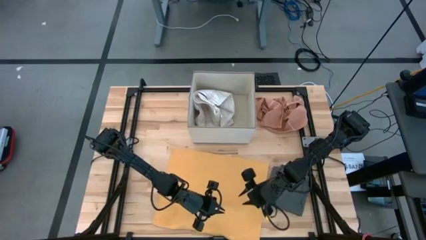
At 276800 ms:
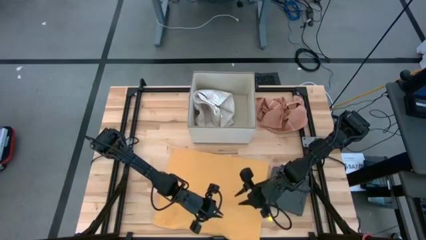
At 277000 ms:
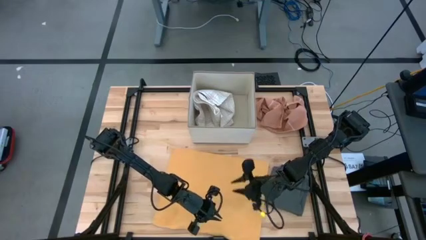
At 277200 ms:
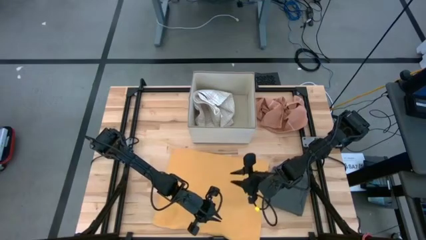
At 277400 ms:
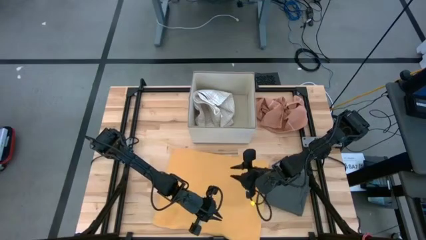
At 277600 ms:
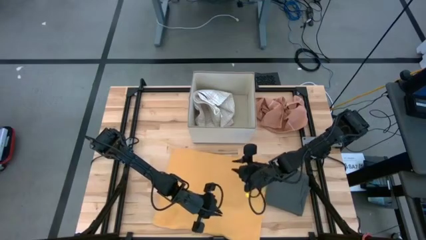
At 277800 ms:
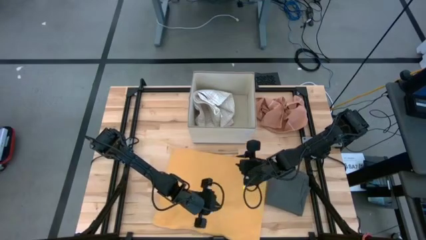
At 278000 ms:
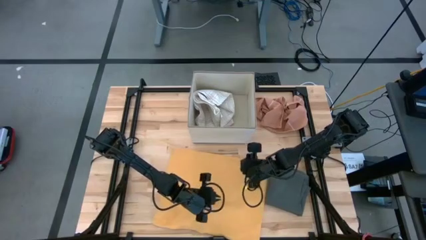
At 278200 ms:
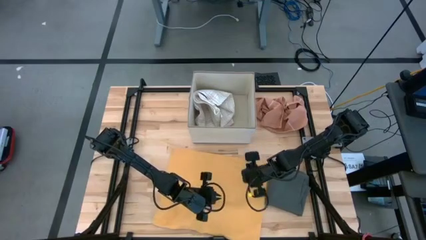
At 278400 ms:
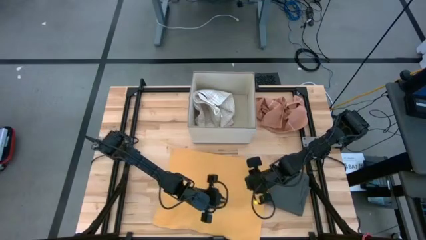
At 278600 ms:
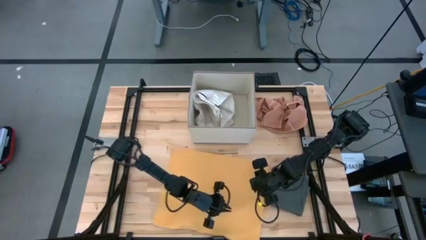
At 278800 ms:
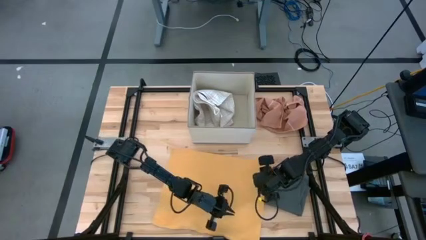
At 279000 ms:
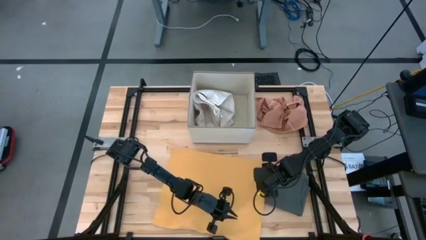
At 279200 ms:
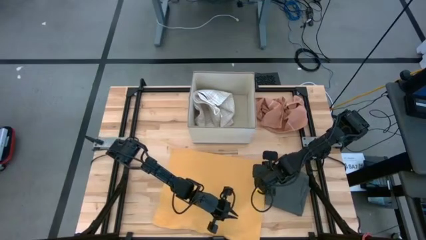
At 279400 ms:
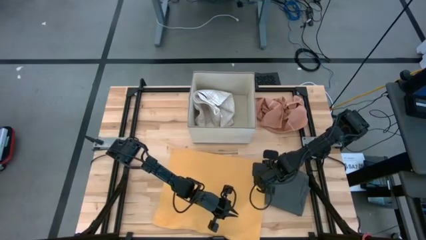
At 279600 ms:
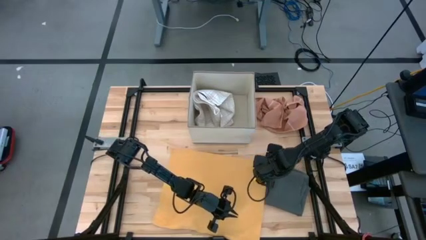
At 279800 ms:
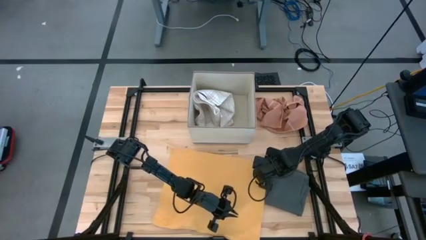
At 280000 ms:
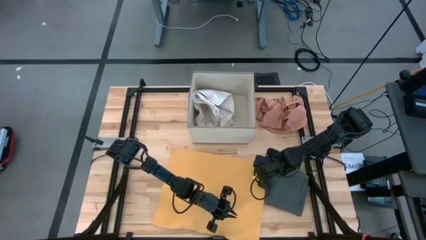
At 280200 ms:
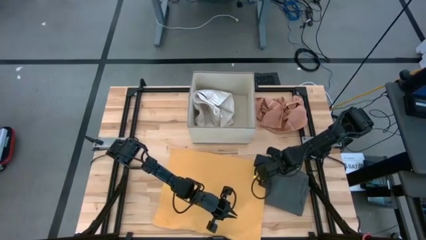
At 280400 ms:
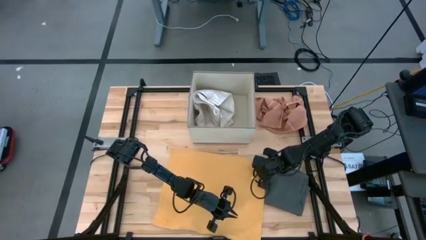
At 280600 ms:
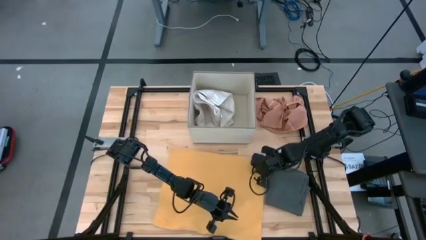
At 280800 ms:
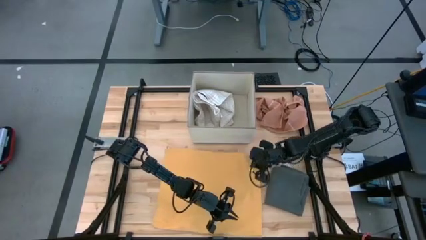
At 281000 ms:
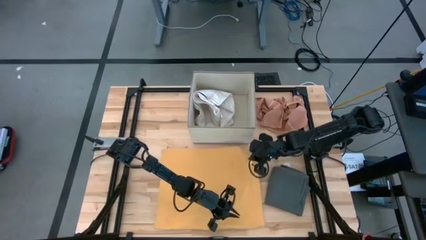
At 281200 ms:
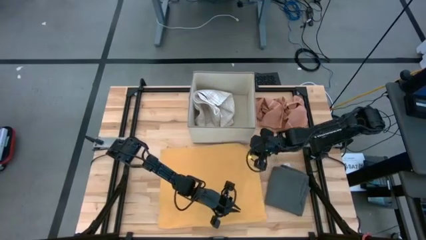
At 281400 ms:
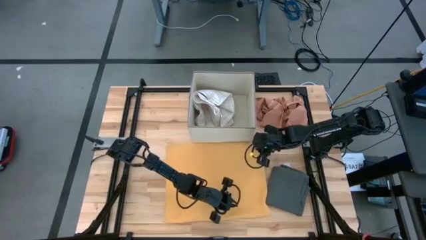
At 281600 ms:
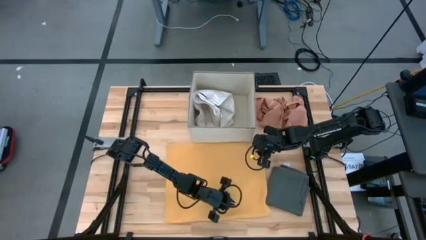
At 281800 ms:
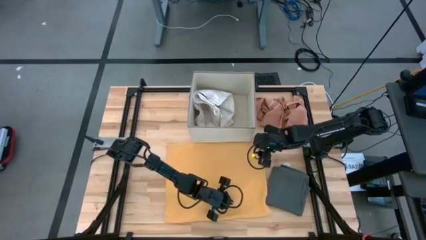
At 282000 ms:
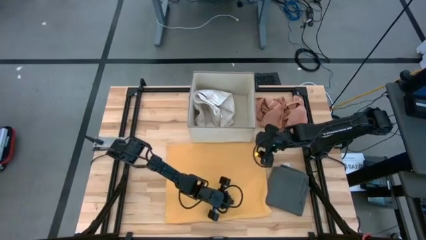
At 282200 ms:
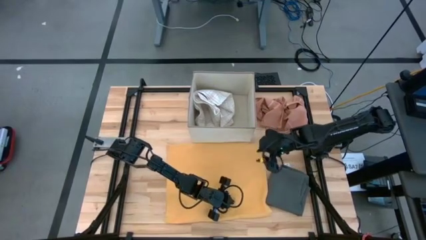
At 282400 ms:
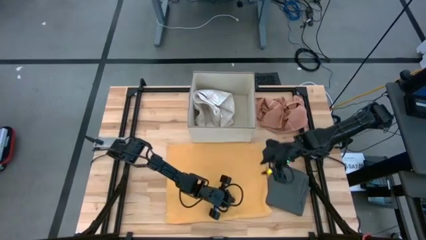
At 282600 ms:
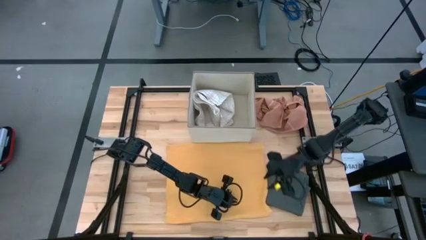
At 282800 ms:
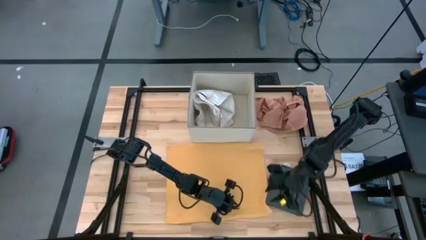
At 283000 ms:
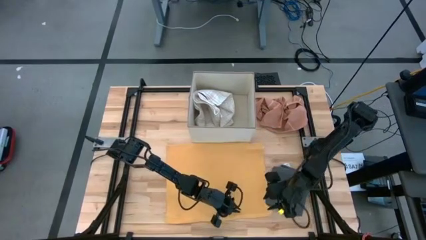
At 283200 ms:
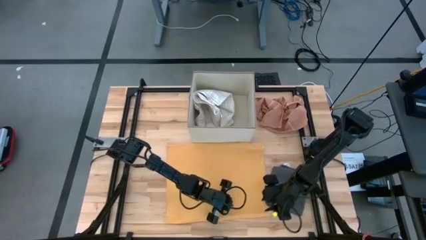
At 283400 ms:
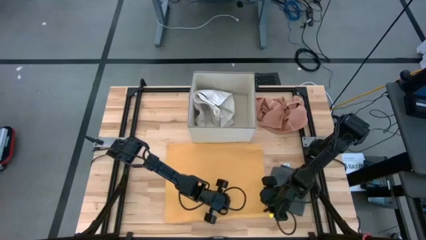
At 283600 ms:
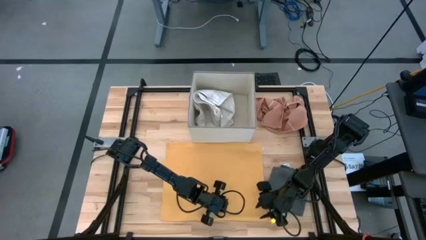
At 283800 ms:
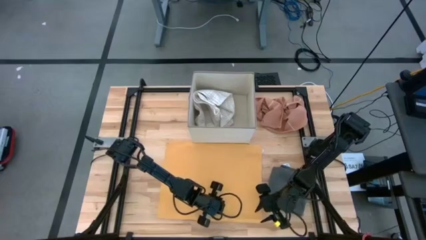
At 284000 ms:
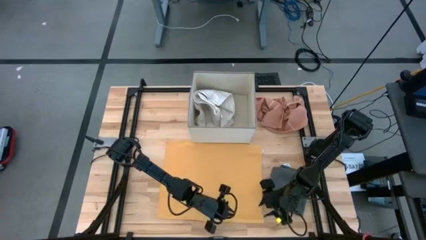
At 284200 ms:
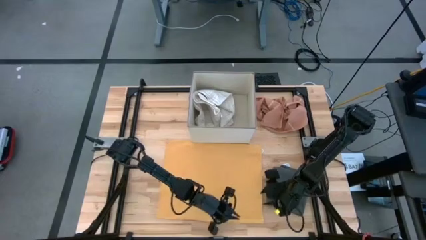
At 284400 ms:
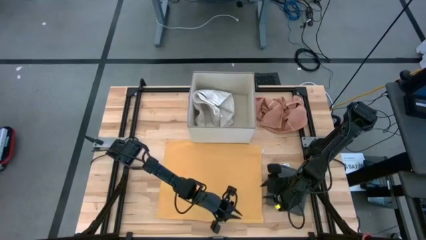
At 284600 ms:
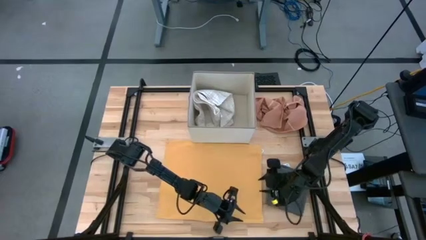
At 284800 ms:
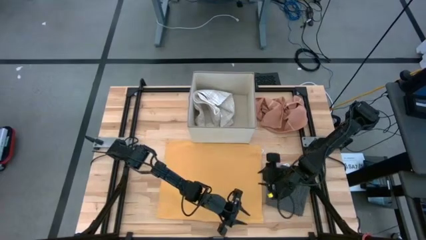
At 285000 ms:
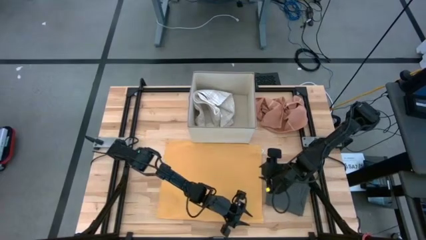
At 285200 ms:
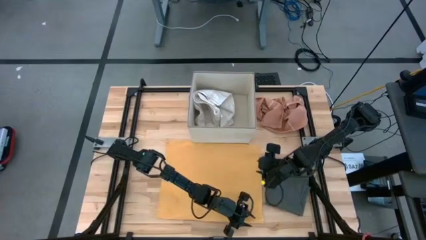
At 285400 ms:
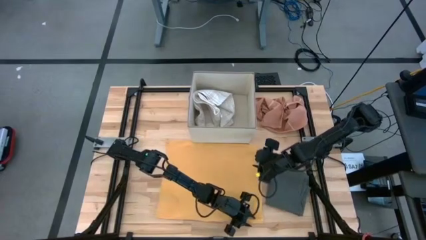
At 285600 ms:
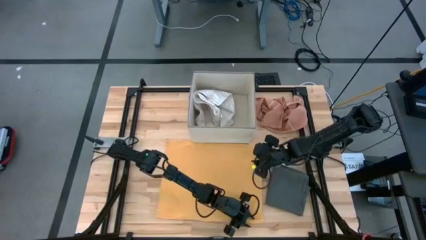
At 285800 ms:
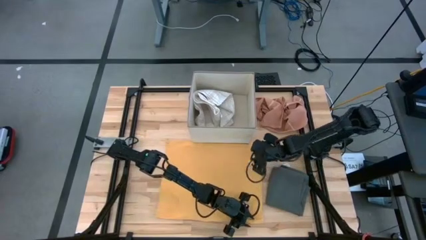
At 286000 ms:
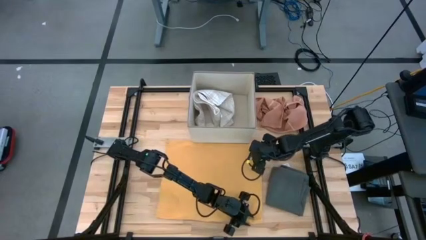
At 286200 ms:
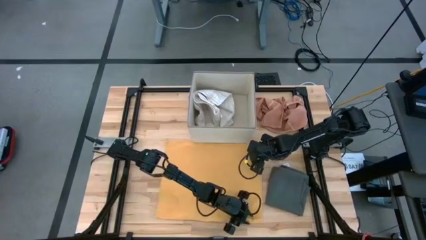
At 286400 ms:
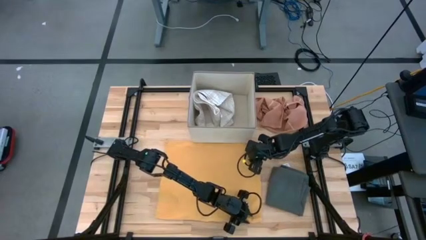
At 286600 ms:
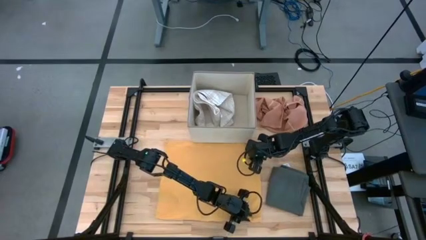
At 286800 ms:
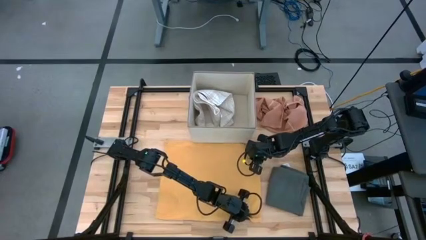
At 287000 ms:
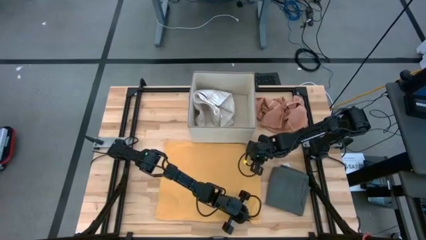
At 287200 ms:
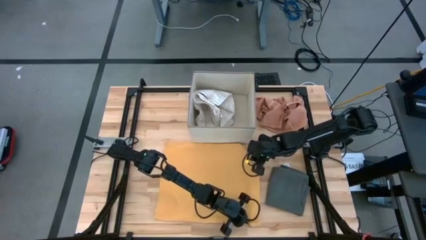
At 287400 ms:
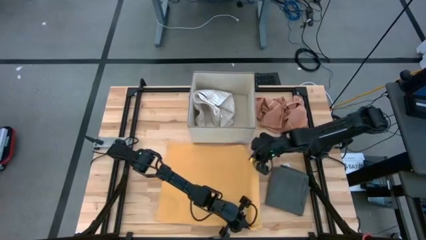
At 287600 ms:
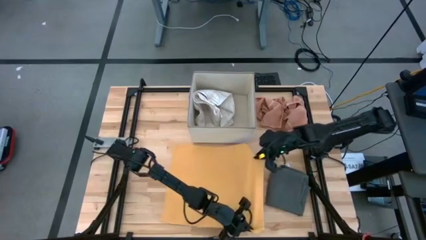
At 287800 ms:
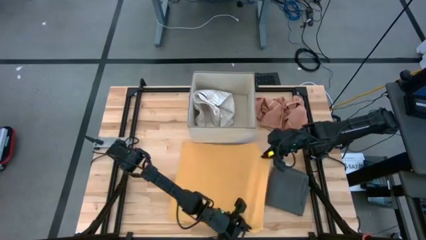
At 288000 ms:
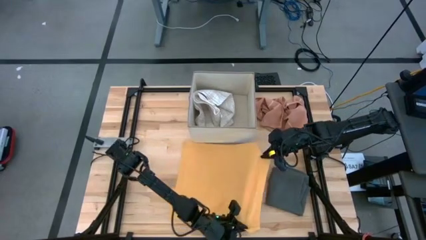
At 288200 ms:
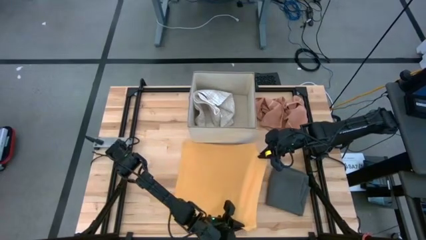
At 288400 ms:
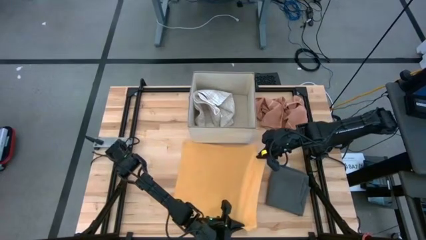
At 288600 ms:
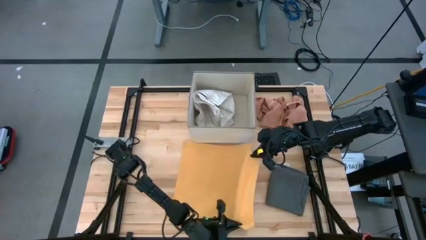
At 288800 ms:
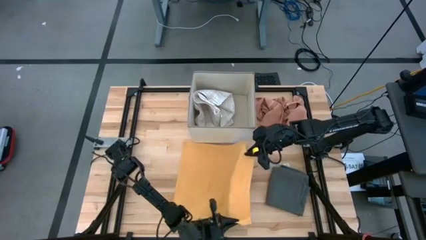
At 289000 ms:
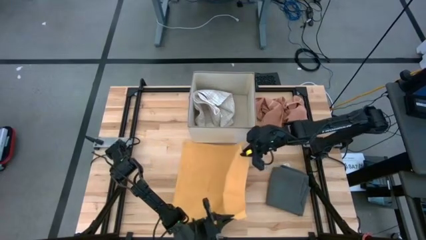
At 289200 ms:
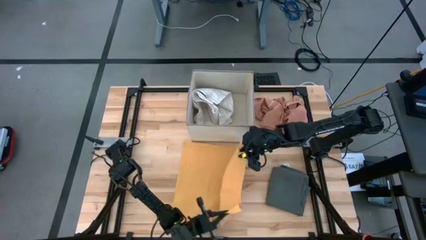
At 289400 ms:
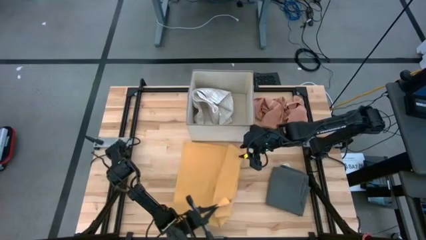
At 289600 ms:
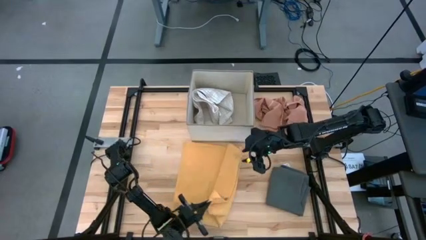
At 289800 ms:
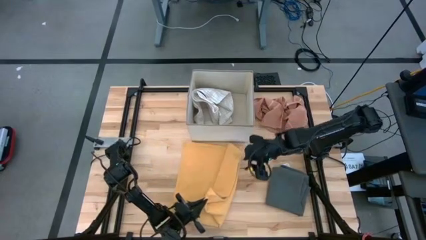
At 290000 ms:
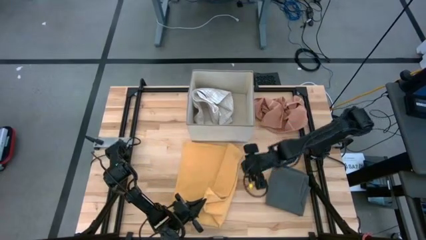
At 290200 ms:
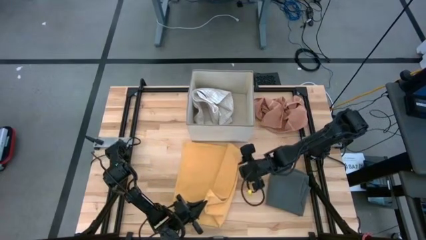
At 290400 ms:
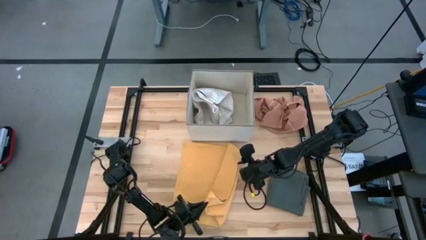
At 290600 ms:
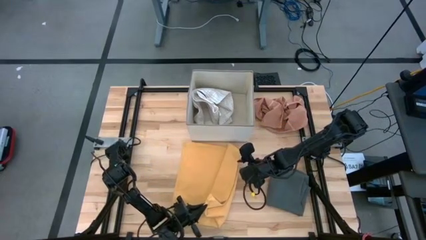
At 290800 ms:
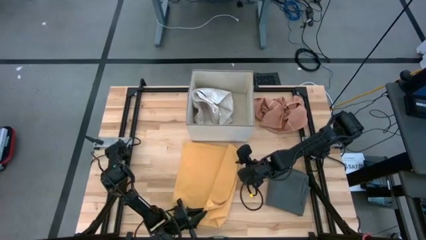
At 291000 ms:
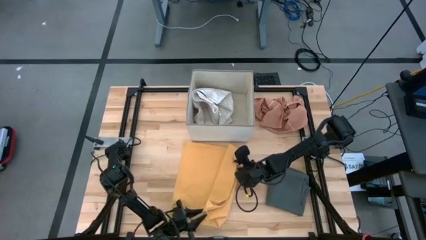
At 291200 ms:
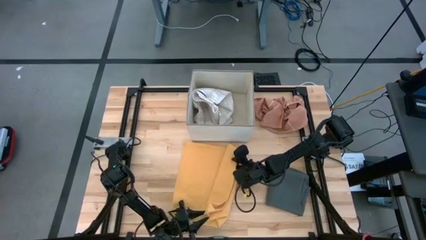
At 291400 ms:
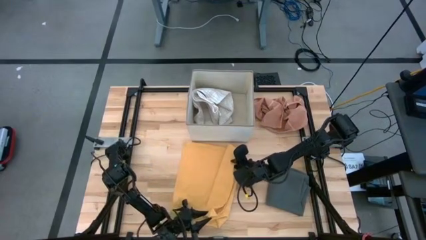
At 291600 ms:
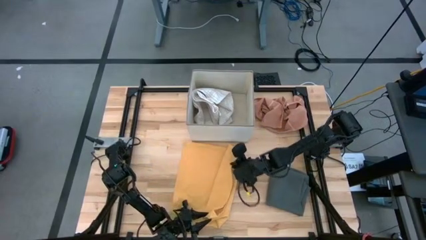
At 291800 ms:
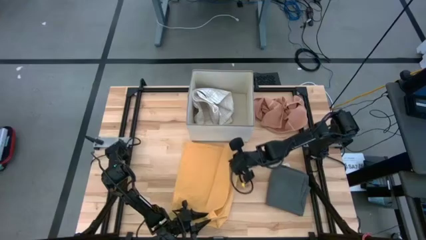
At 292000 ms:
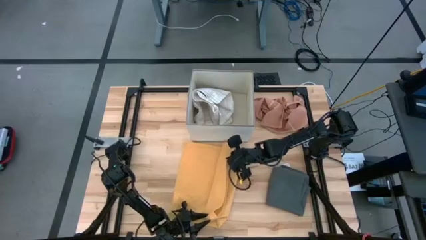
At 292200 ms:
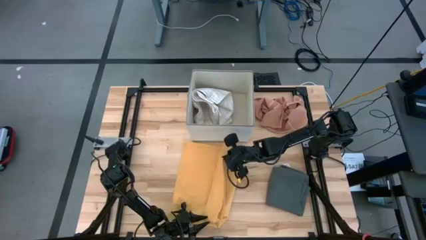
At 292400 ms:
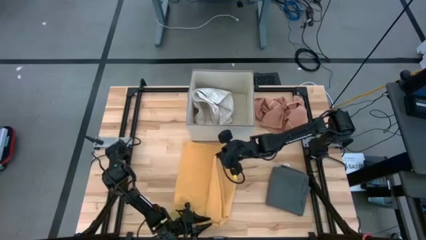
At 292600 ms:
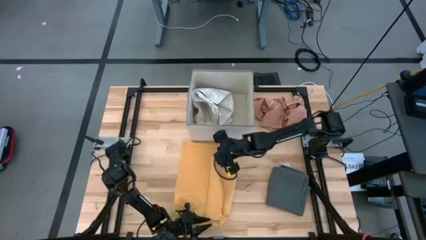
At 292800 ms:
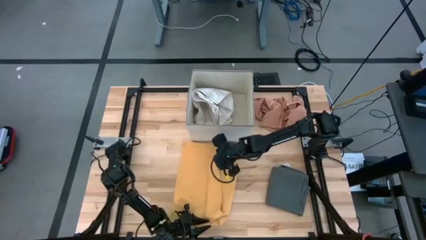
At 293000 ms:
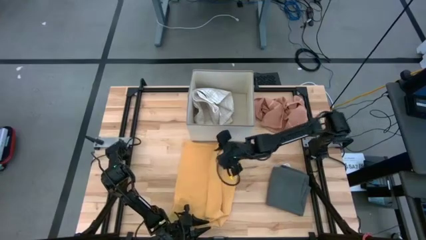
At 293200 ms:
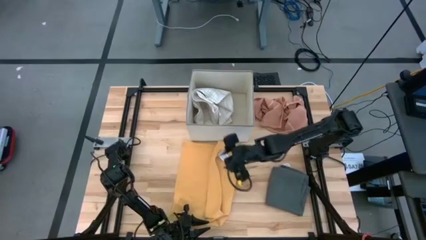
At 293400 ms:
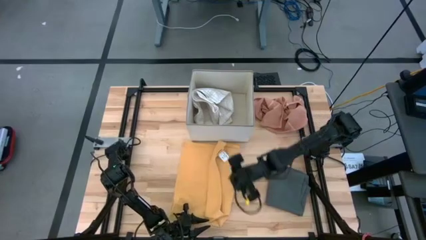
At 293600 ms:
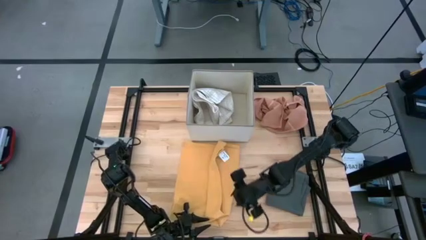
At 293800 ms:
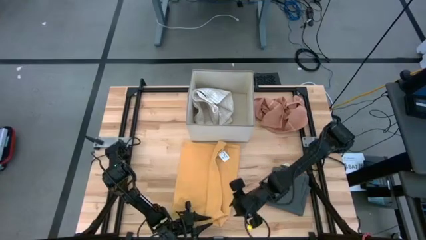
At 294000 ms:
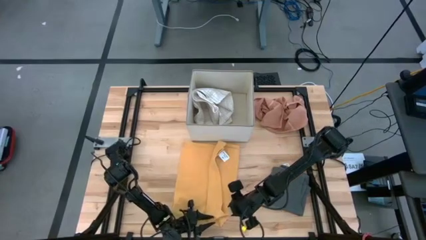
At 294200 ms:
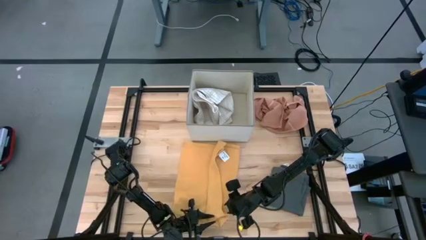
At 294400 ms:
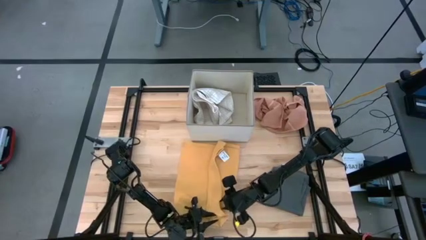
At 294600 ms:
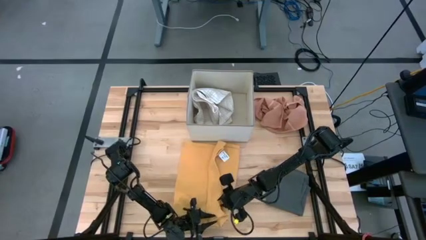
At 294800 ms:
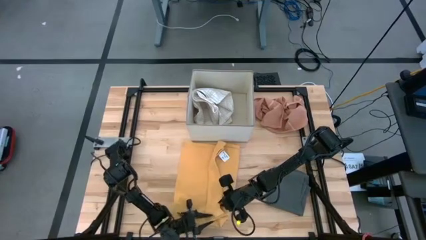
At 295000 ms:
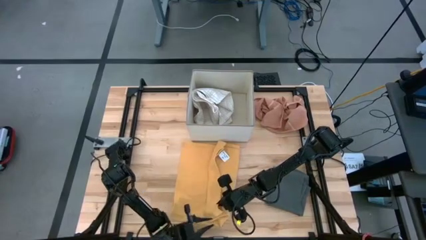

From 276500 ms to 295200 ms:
Task: Fold towel
Fold the yellow towel
